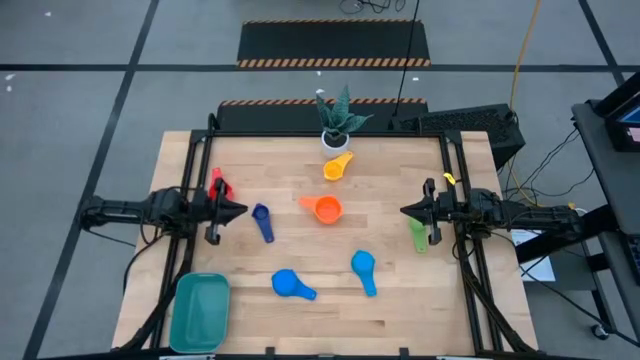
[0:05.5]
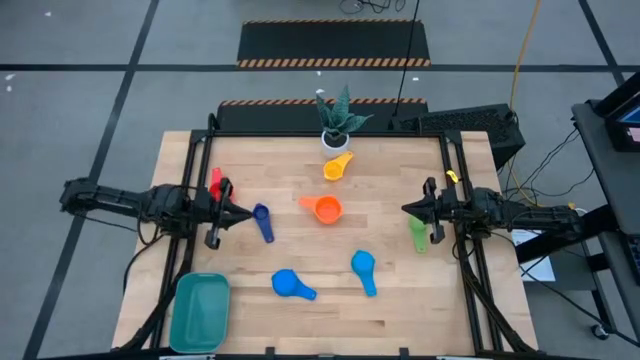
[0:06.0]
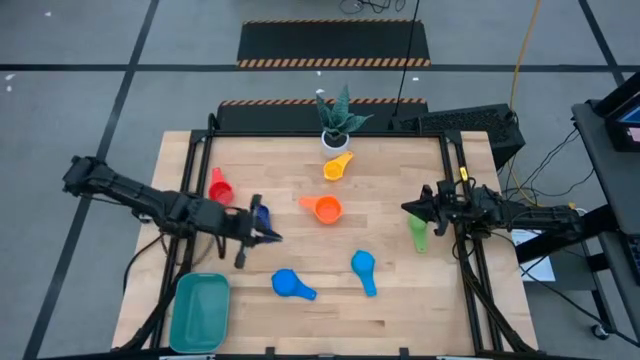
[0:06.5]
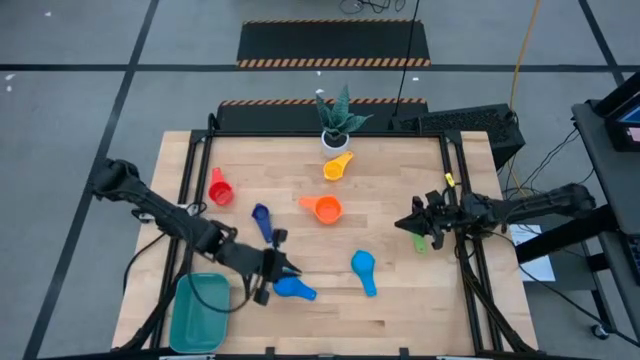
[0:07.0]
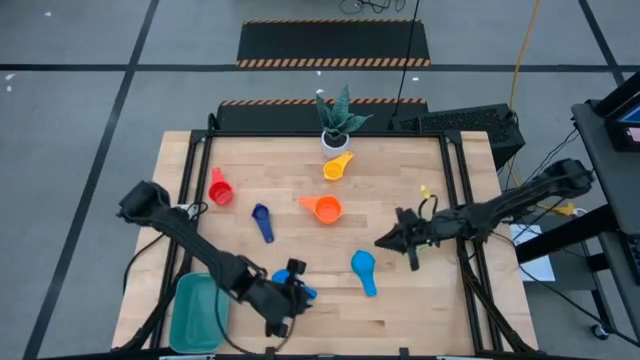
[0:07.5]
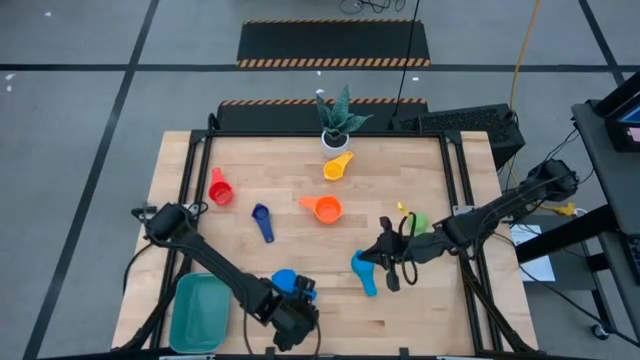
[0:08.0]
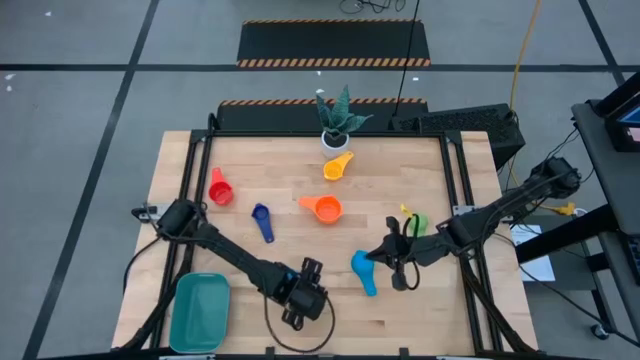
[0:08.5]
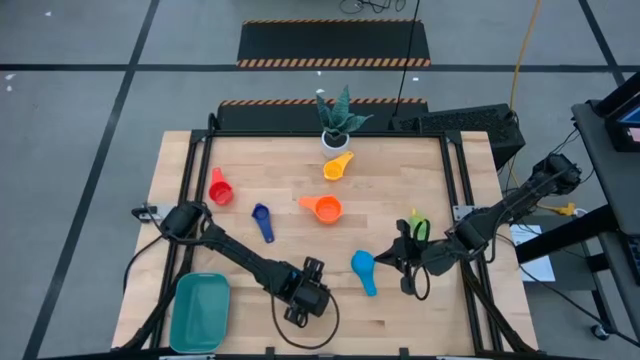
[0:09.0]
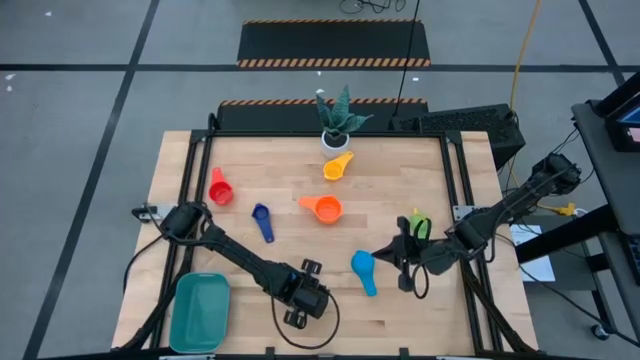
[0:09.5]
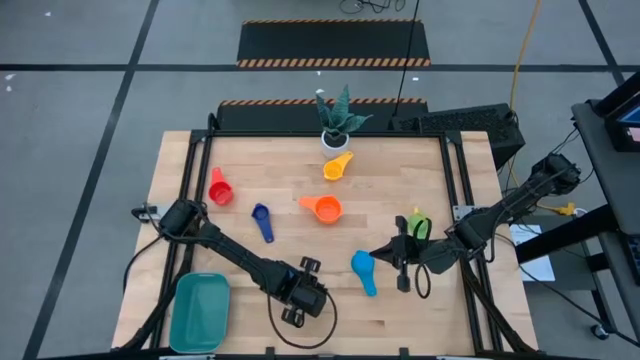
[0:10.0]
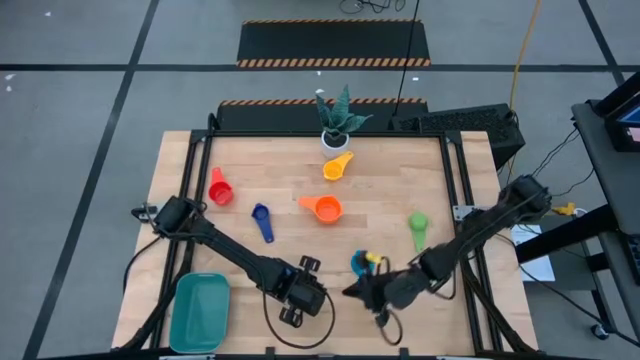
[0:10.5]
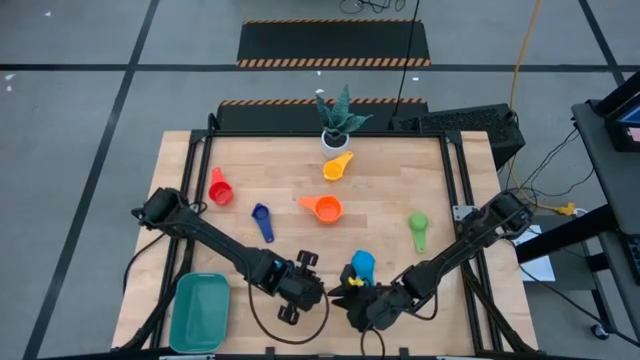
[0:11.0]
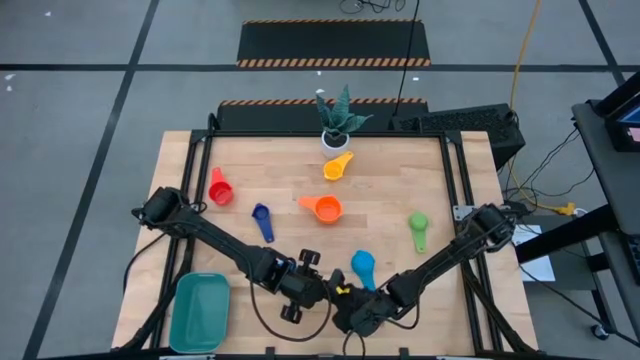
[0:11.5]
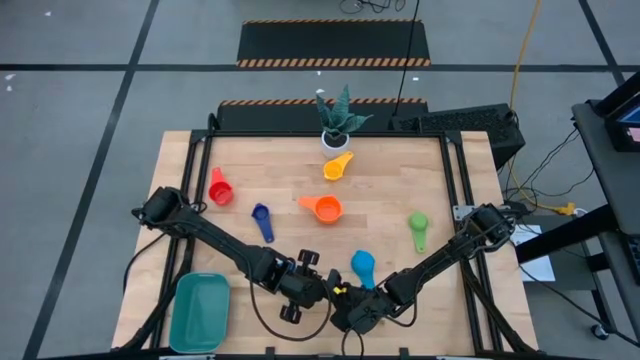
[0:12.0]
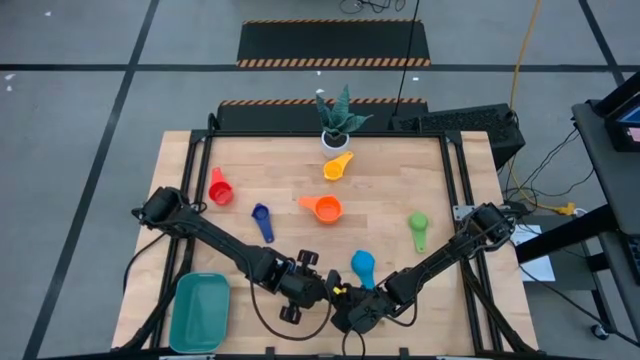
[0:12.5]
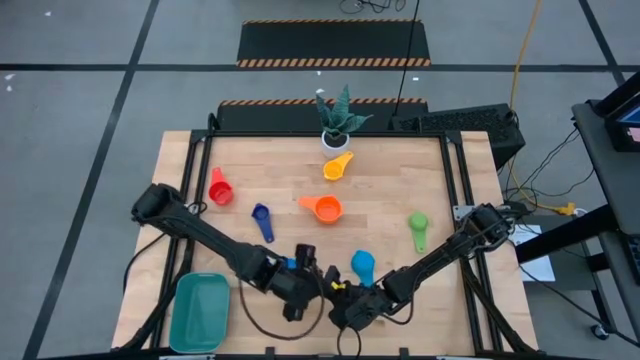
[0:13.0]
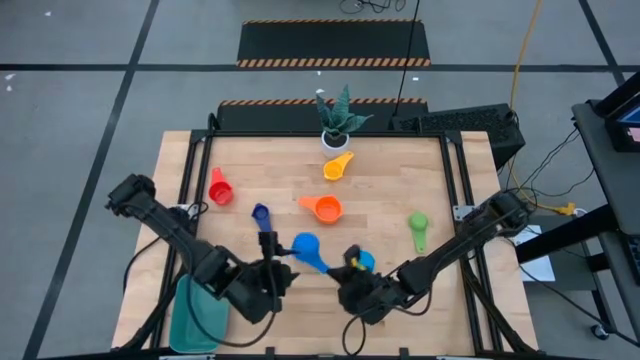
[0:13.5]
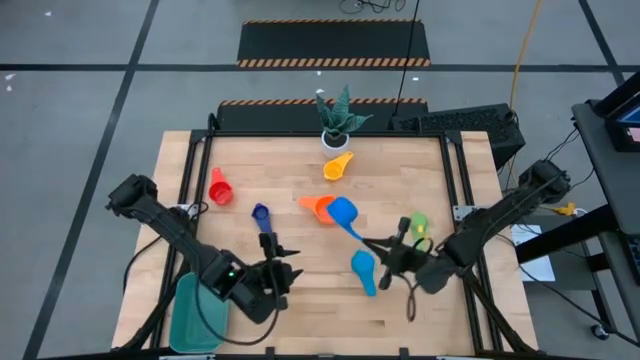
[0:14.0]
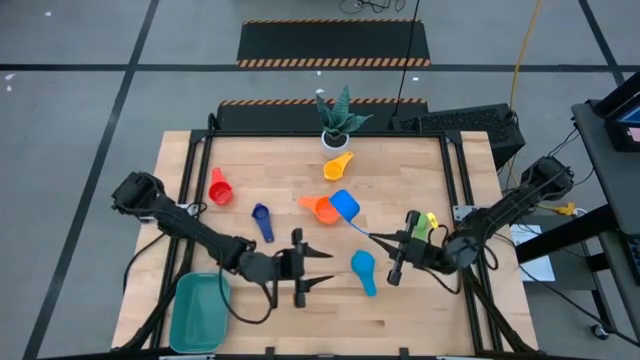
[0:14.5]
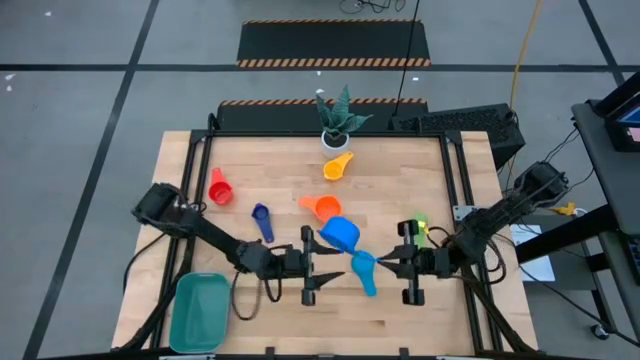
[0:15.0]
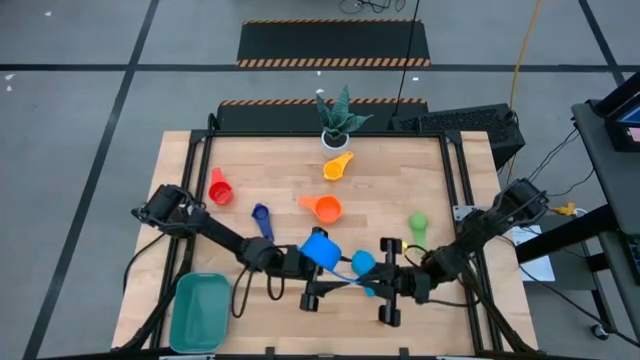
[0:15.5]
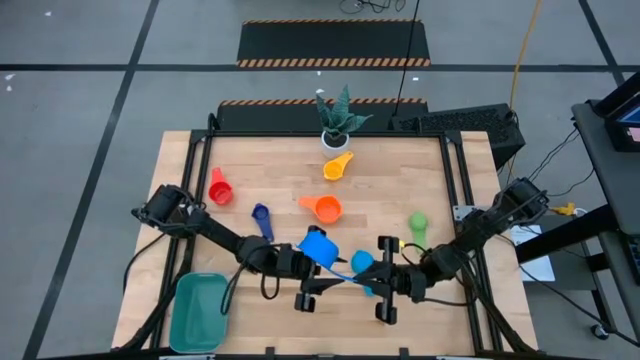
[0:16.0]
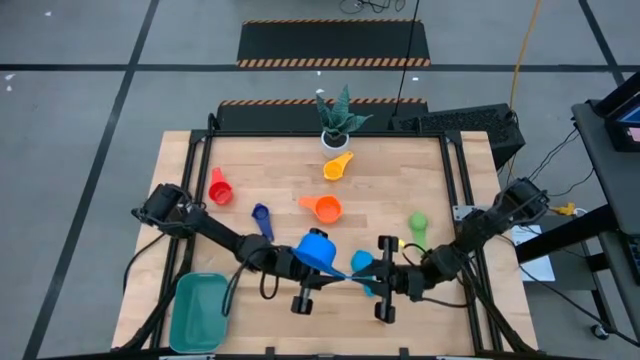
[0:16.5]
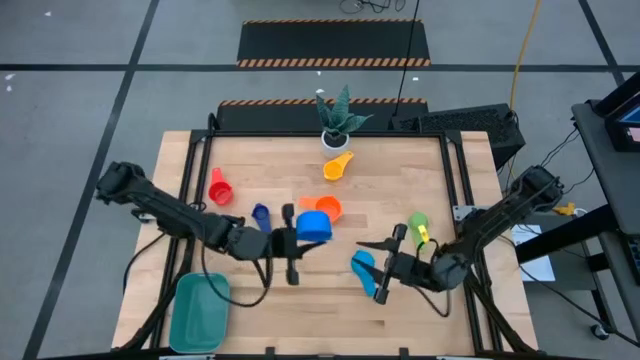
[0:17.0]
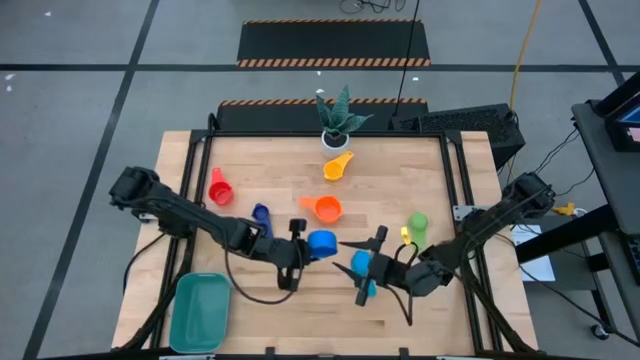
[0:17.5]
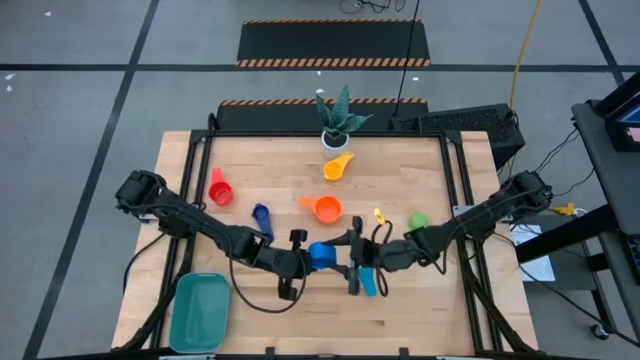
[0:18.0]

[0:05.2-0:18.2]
Task: Nest measuring cups in basket
Stack the blue measuring cup on the orange measuring cup

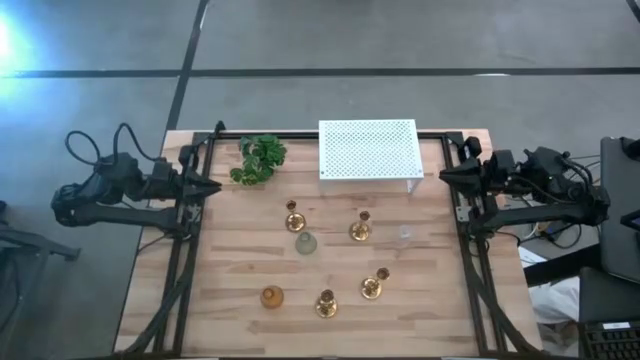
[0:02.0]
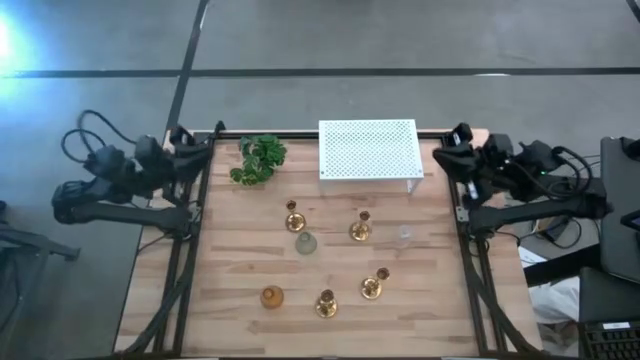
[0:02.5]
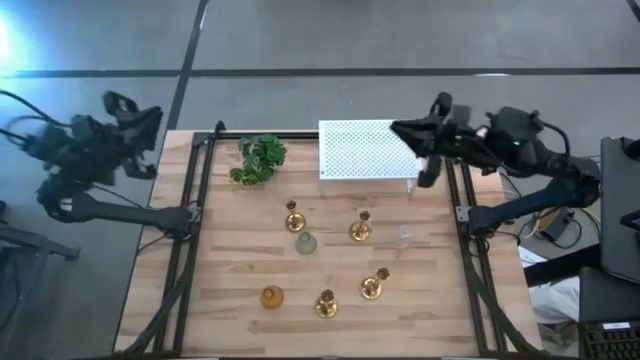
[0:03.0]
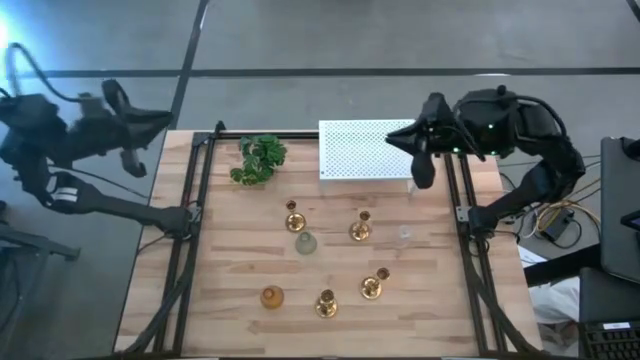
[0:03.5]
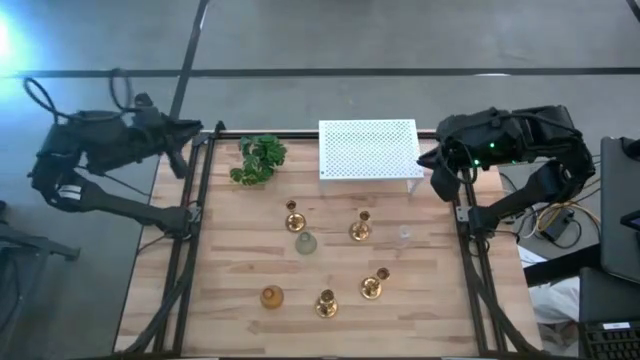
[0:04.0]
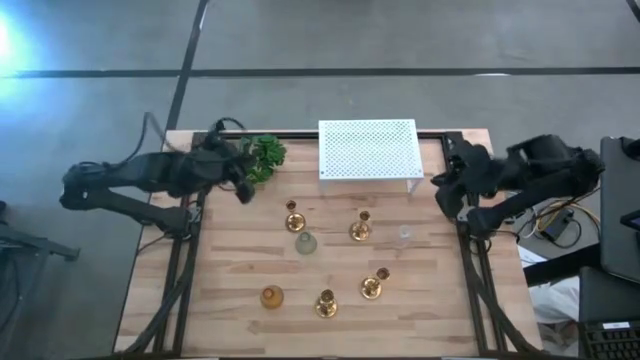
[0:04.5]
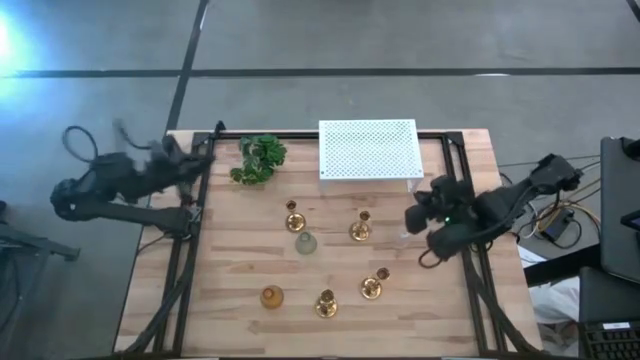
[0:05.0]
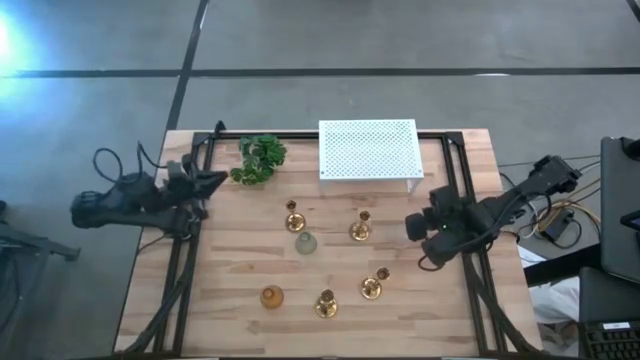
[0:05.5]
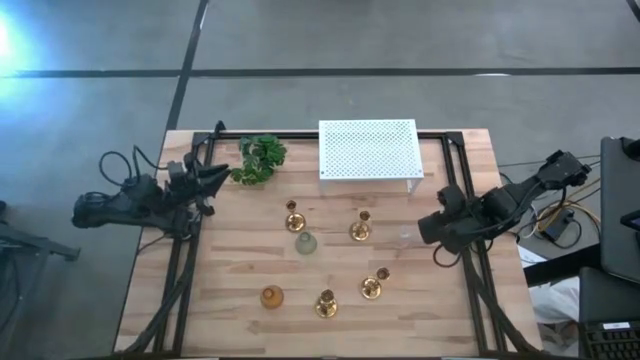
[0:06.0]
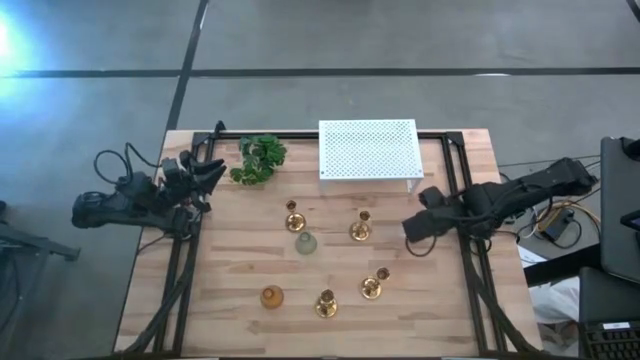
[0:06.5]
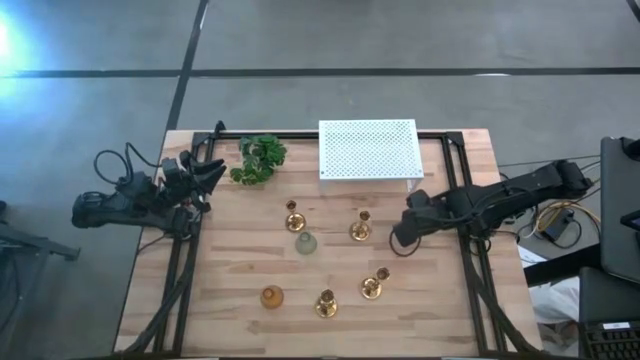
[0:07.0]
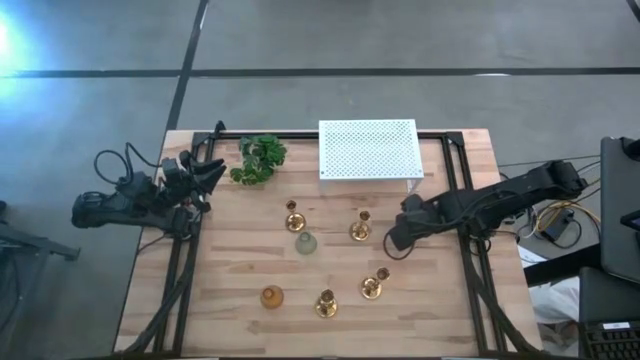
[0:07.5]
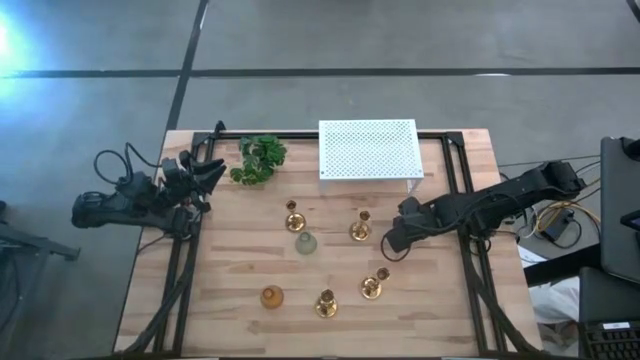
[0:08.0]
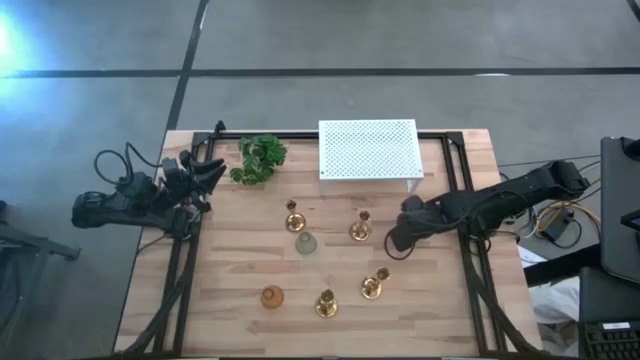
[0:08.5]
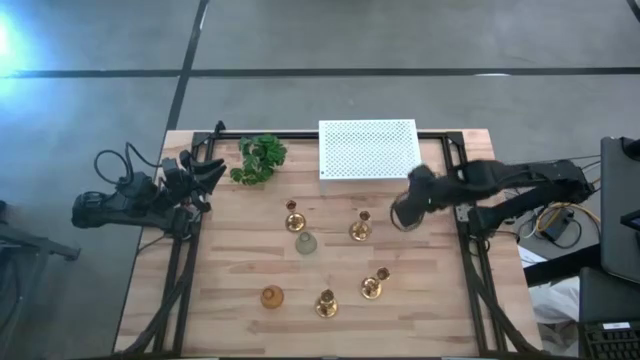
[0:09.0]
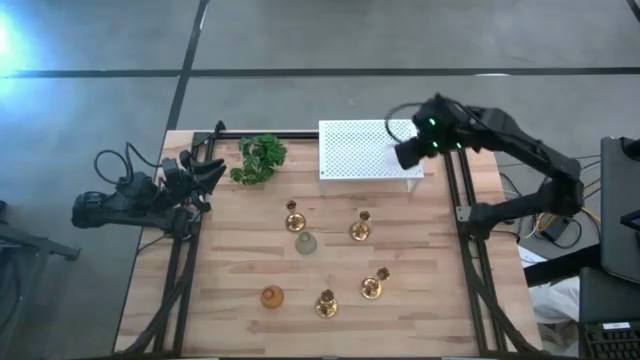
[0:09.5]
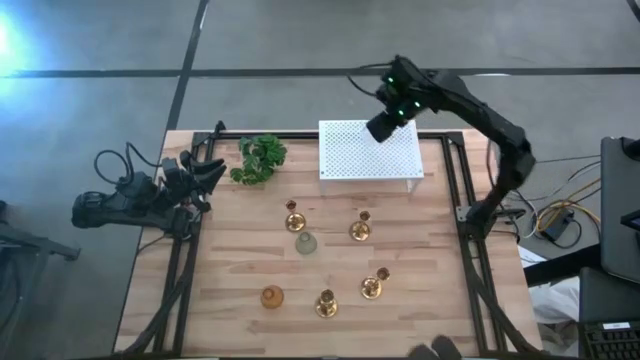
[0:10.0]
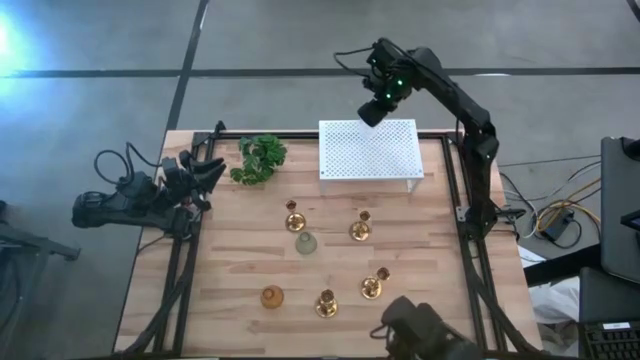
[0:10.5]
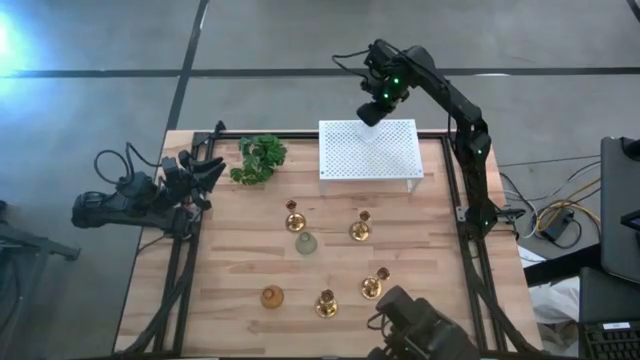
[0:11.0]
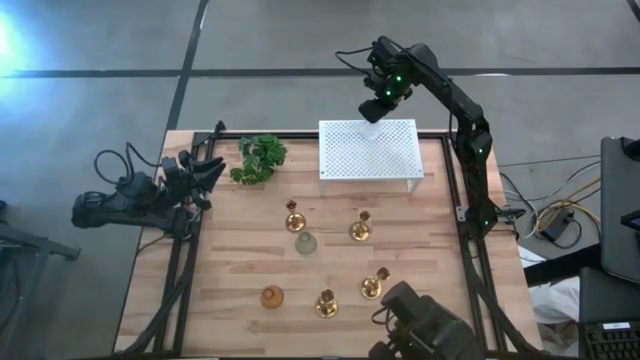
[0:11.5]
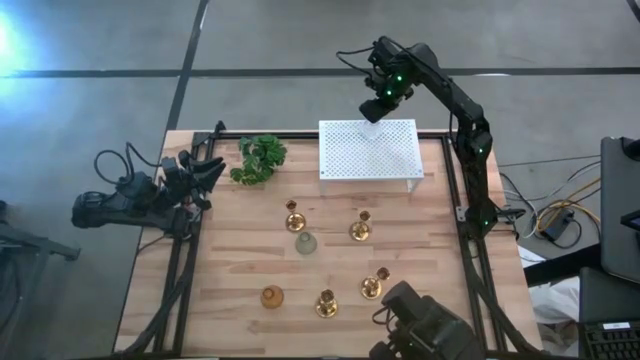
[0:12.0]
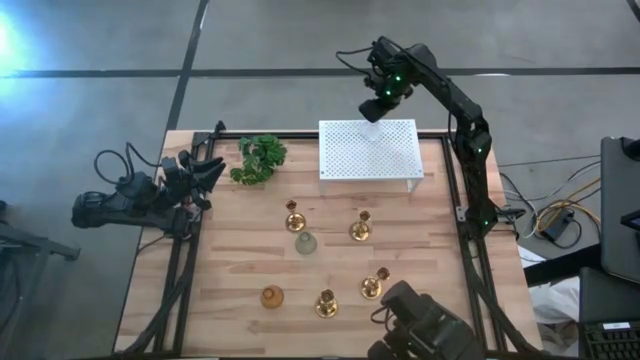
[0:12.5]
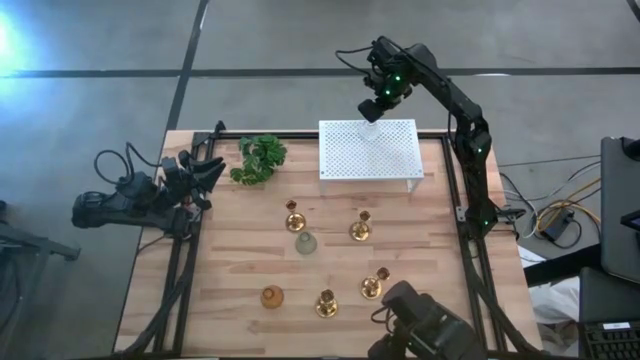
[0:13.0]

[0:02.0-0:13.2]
Task: Pick & Place candle stick holders
Put the transparent glass candle holder on the shelf
